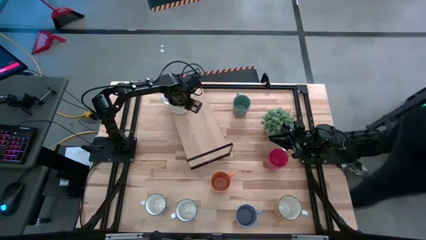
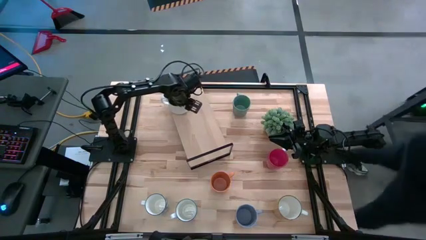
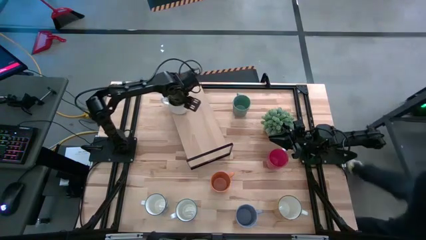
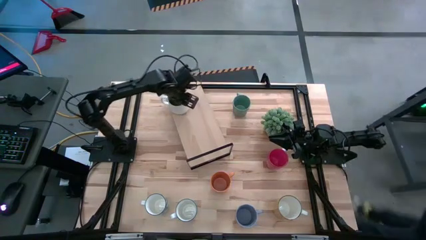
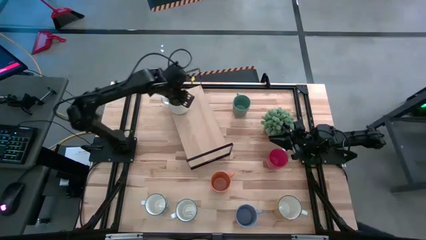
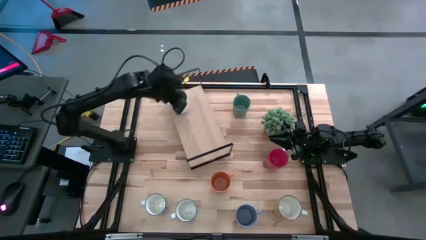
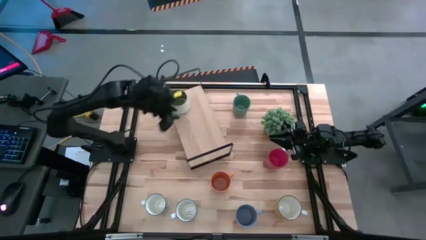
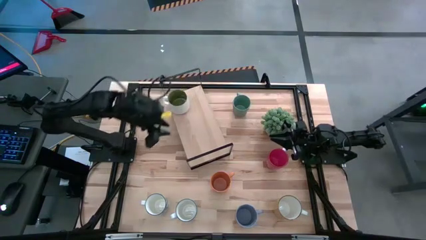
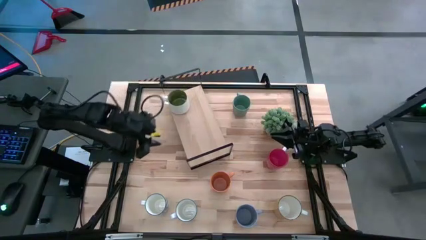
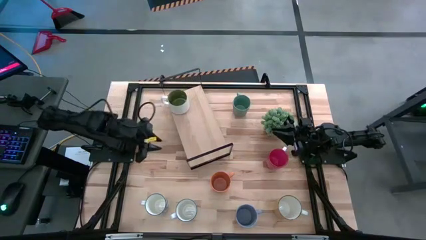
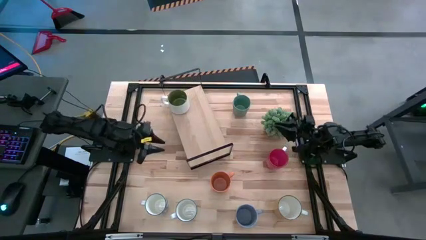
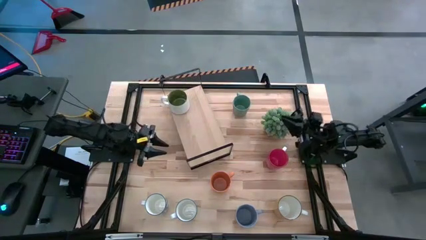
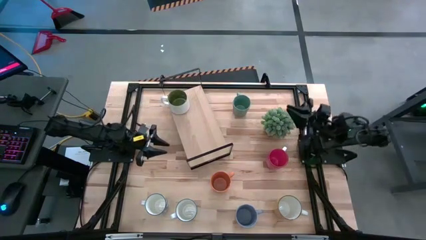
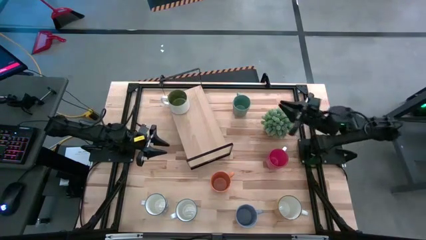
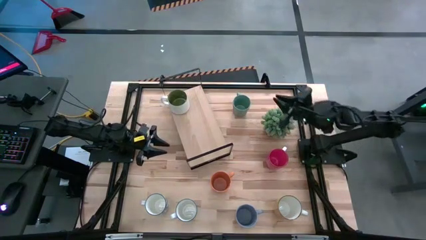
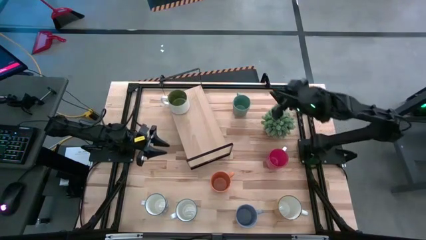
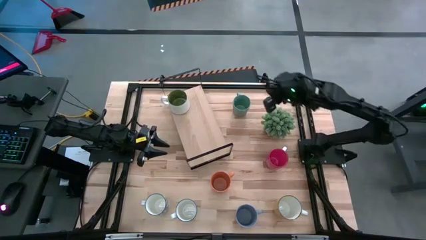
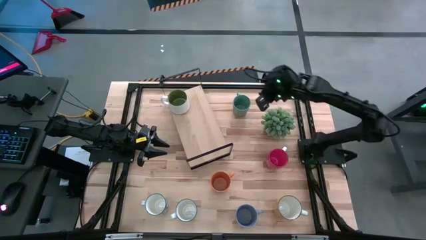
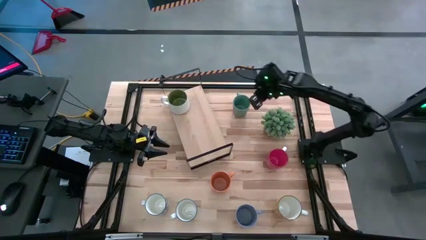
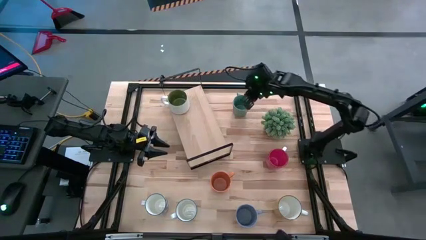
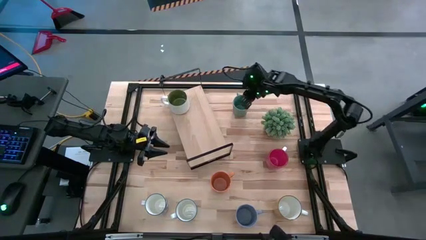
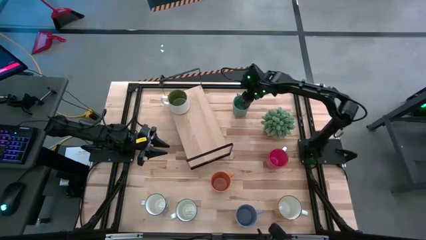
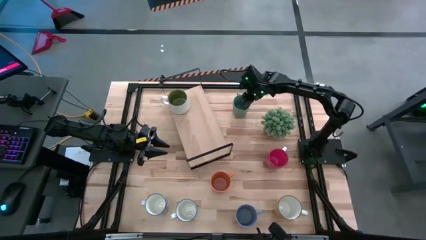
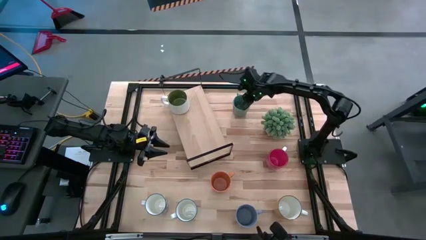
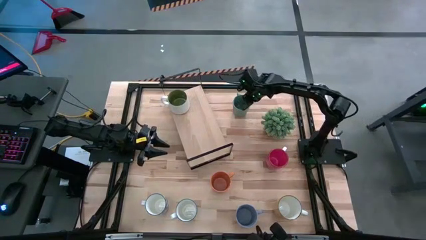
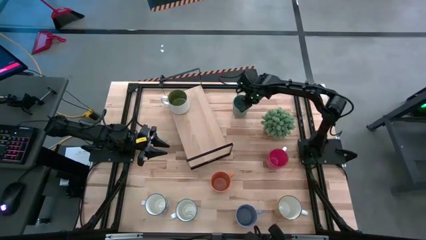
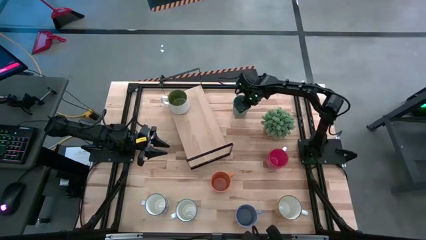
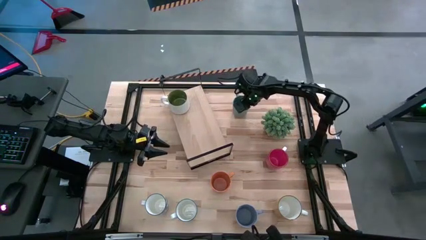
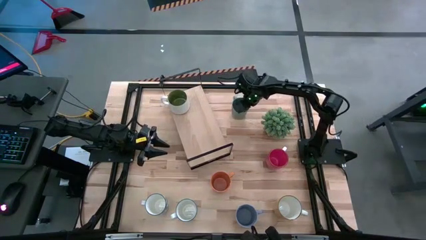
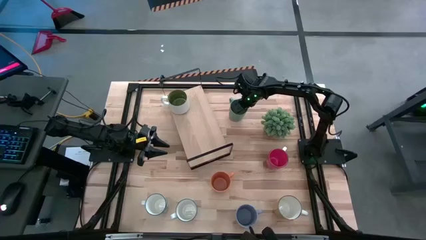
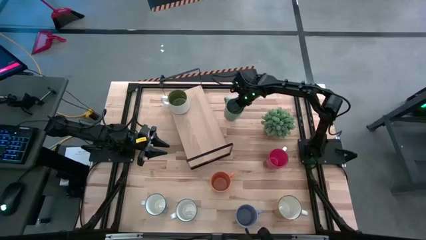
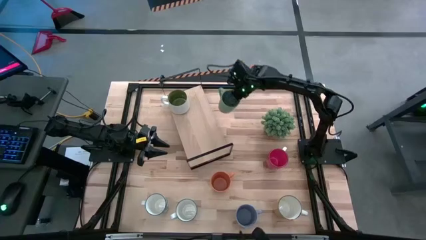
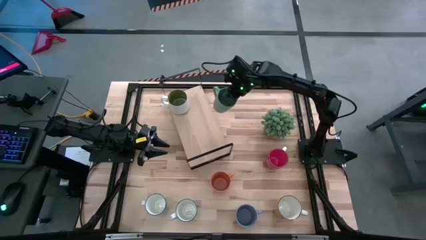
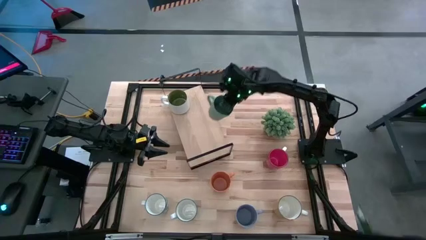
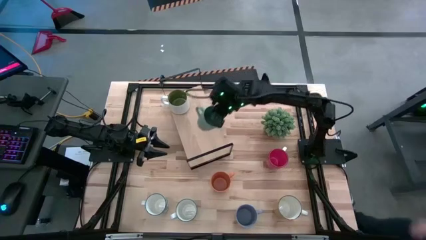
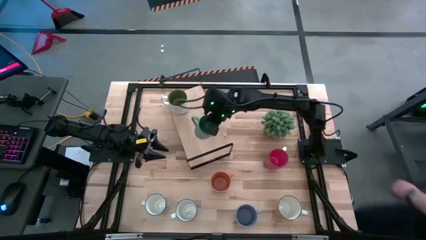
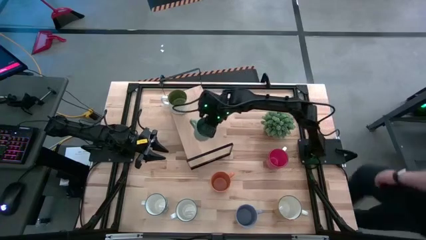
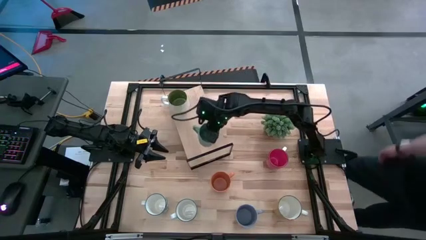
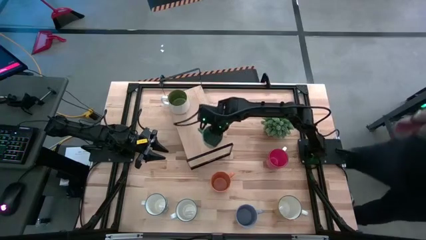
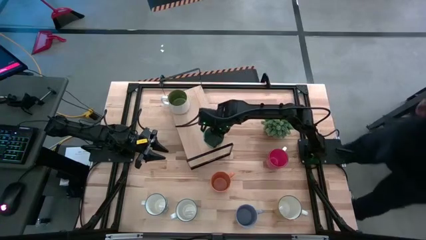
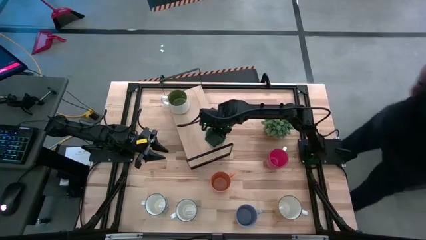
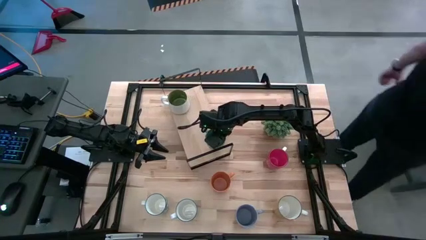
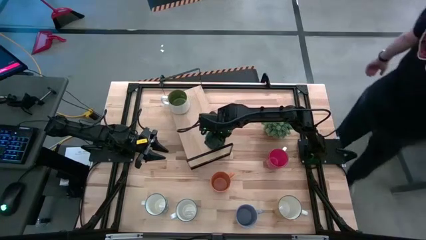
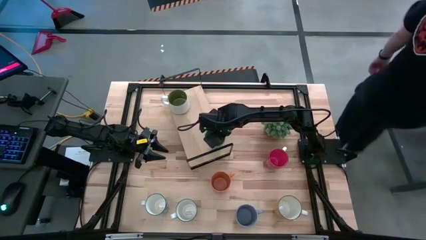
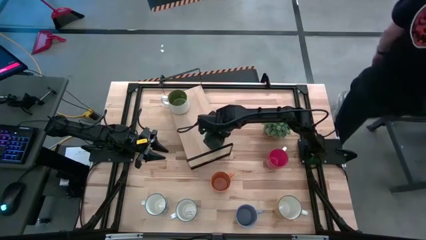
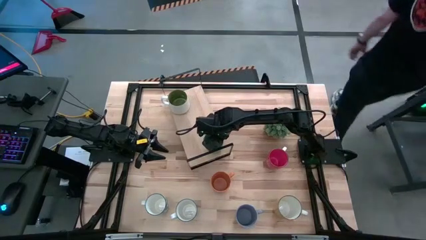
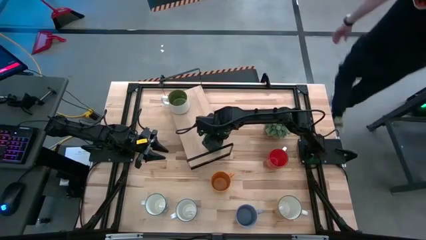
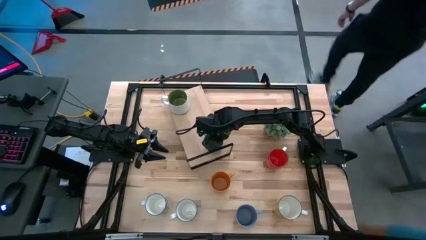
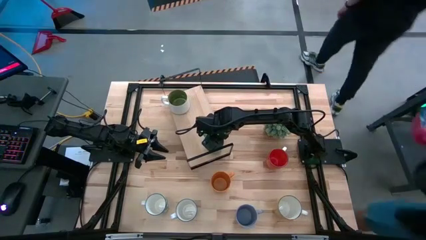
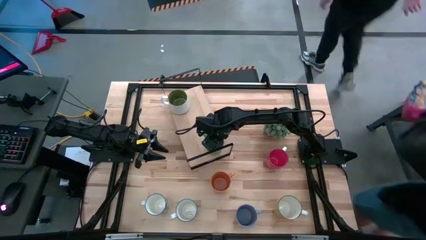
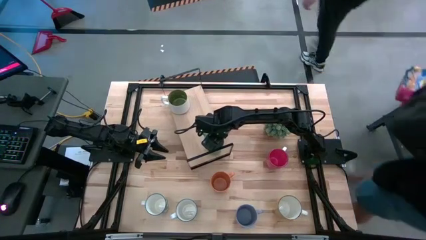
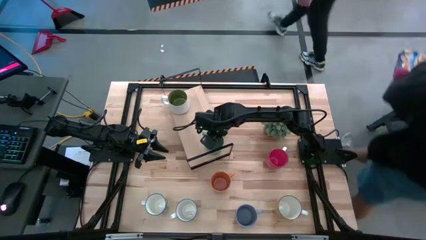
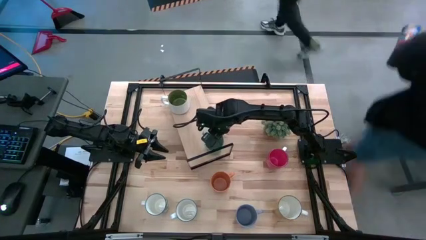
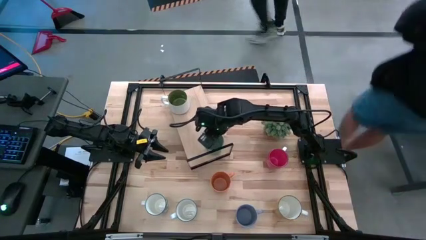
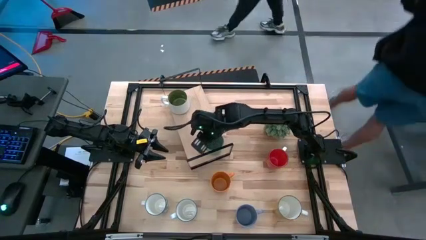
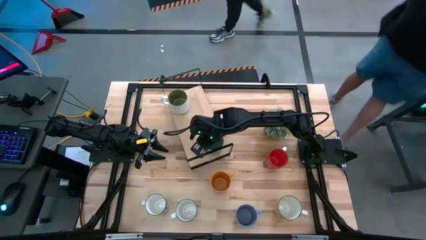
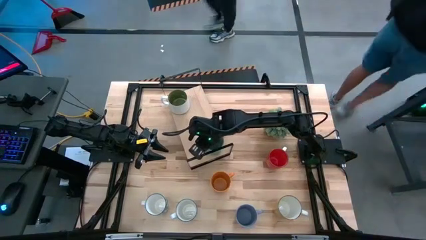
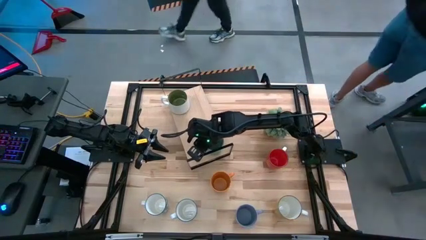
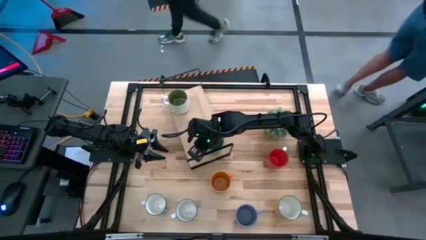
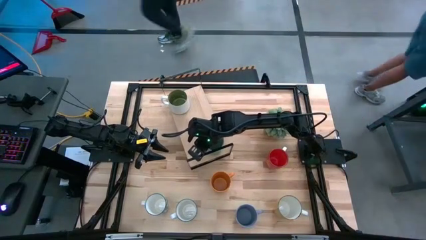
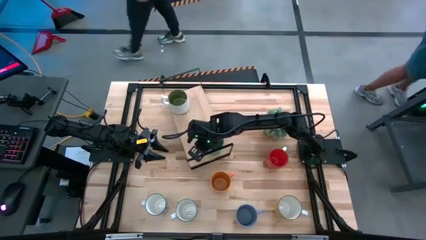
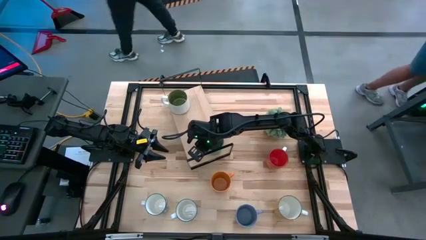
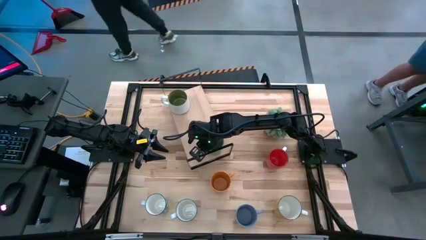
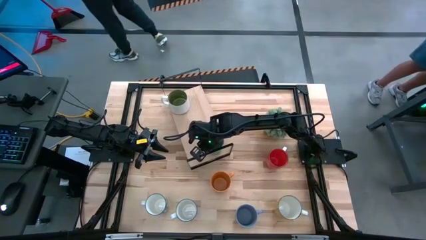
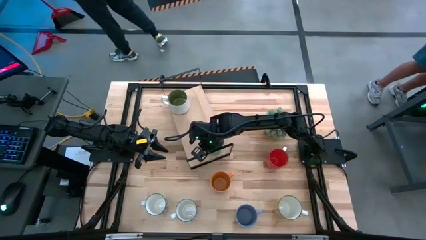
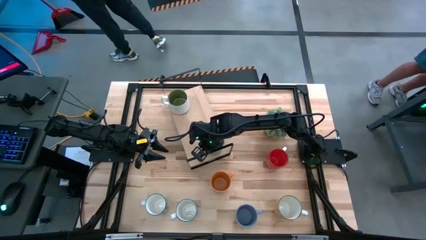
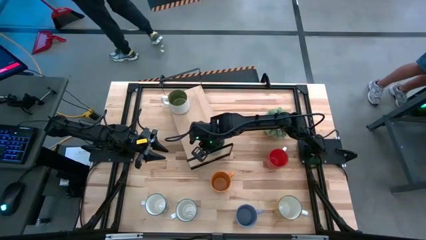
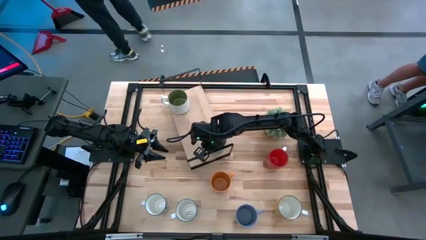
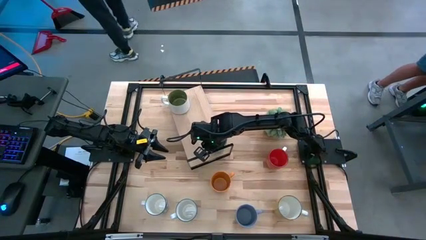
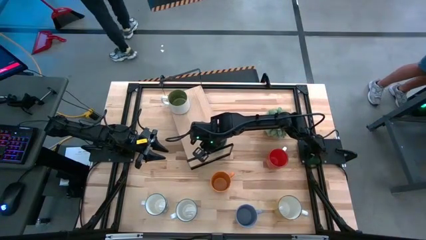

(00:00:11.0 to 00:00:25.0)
Task: Place coffee mugs
Put the green mug on the shelf
